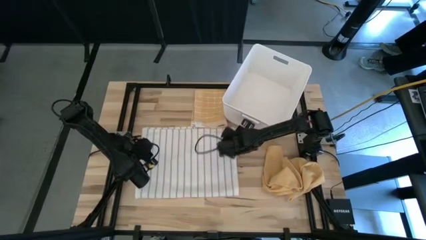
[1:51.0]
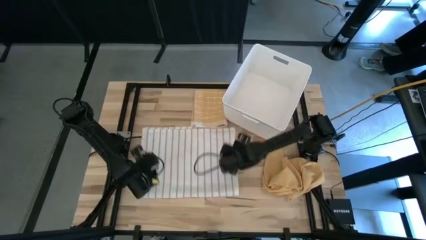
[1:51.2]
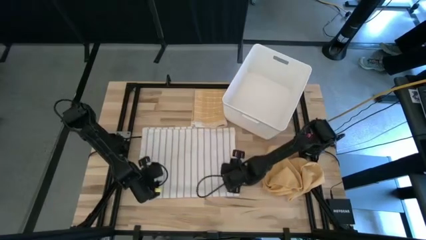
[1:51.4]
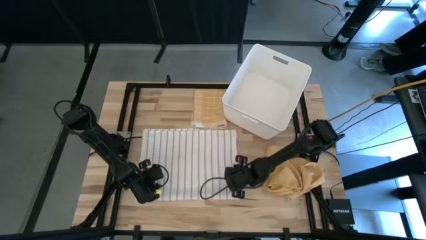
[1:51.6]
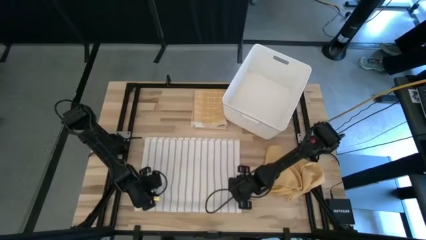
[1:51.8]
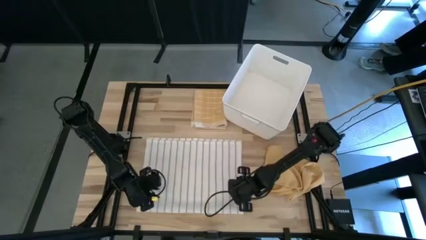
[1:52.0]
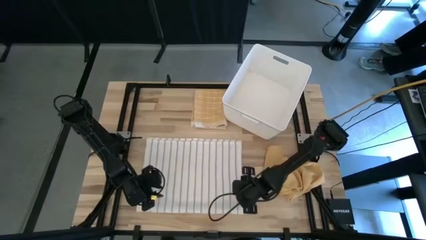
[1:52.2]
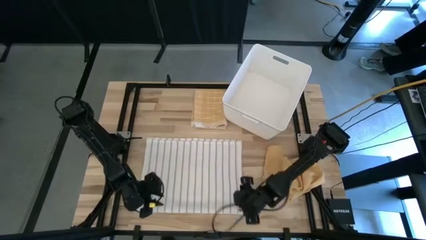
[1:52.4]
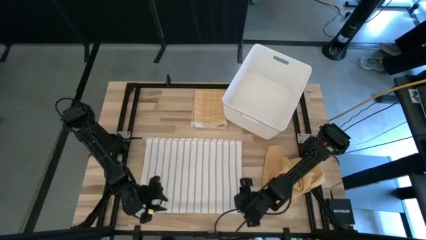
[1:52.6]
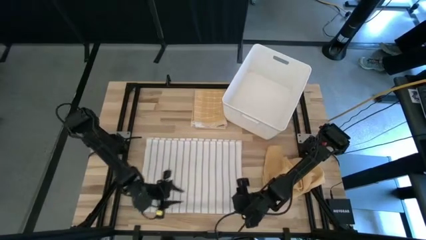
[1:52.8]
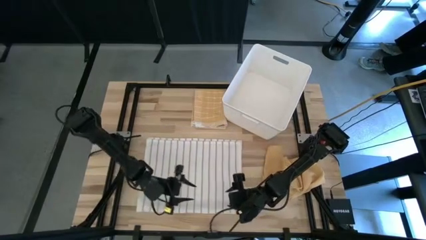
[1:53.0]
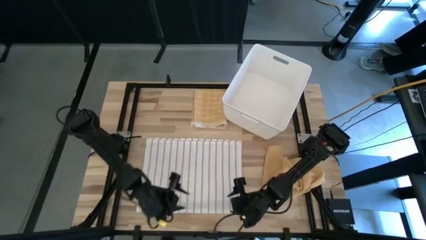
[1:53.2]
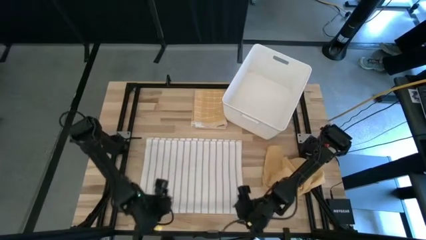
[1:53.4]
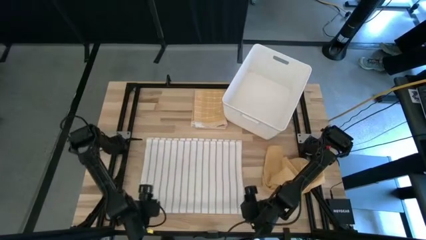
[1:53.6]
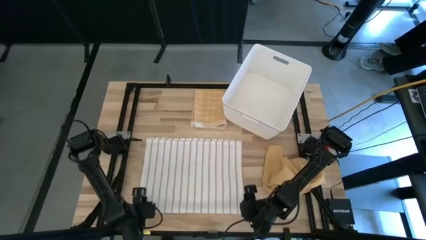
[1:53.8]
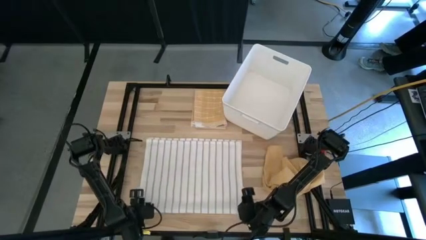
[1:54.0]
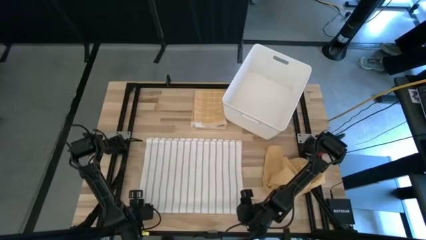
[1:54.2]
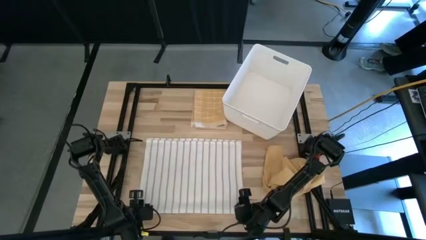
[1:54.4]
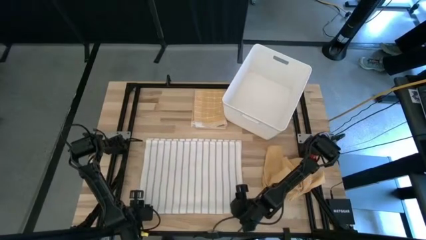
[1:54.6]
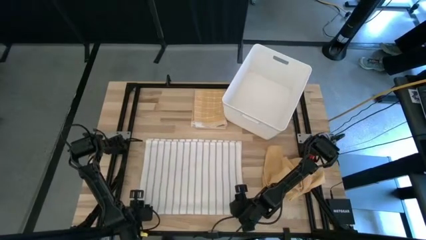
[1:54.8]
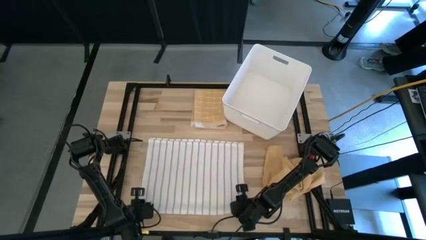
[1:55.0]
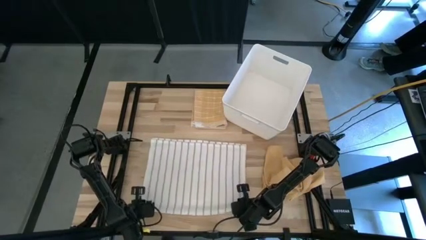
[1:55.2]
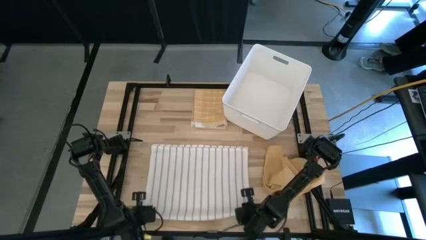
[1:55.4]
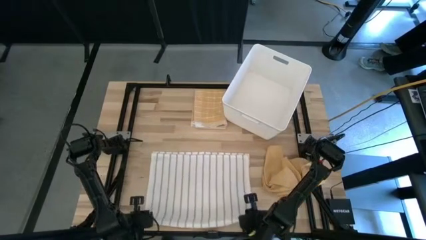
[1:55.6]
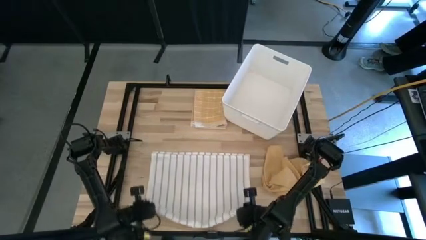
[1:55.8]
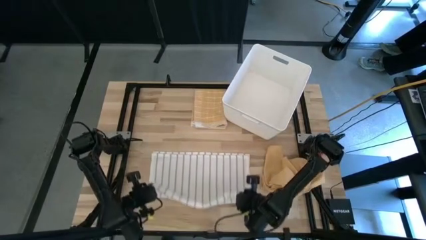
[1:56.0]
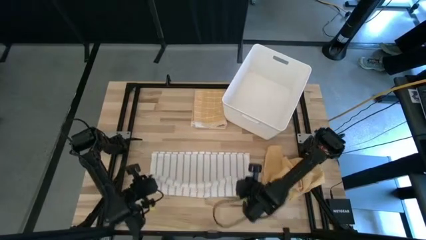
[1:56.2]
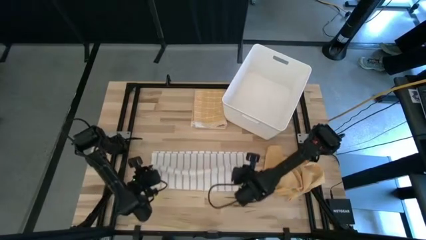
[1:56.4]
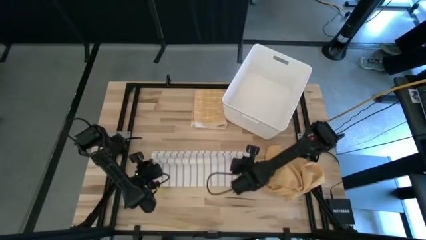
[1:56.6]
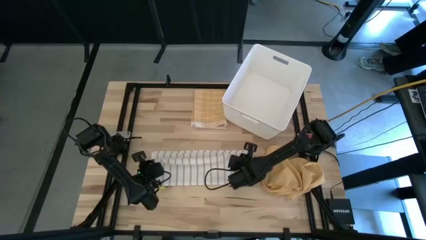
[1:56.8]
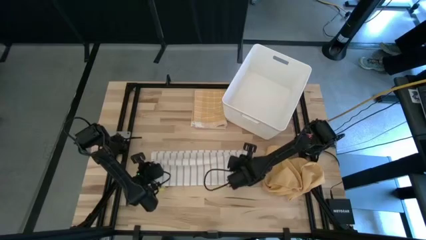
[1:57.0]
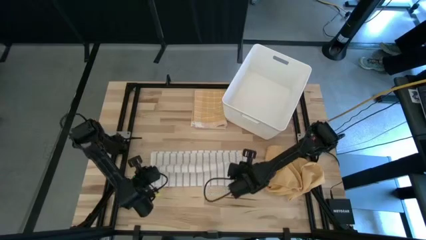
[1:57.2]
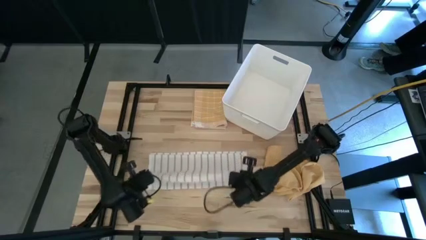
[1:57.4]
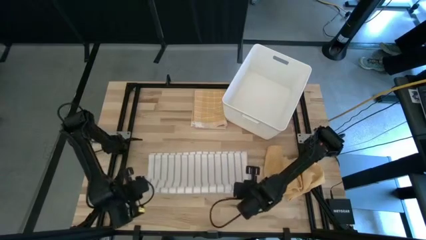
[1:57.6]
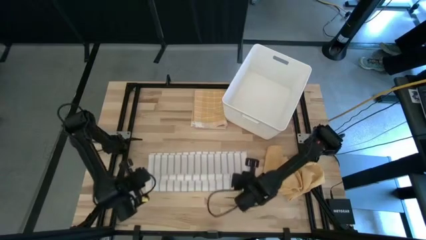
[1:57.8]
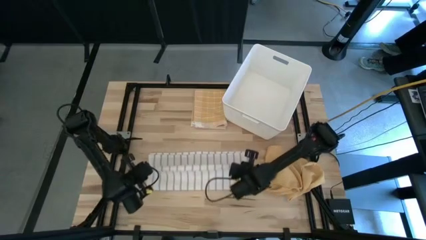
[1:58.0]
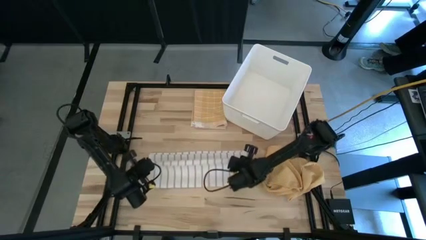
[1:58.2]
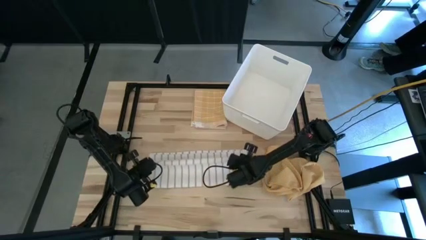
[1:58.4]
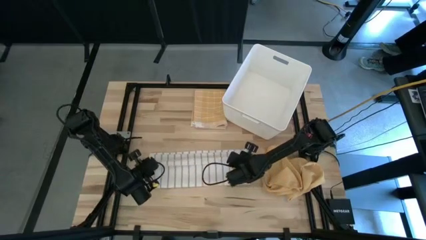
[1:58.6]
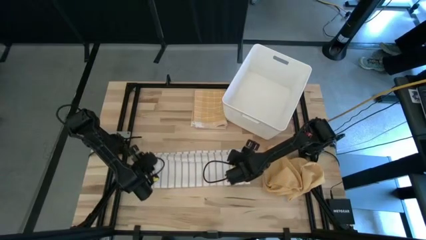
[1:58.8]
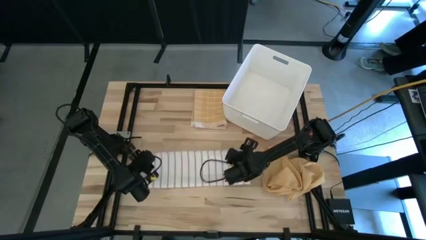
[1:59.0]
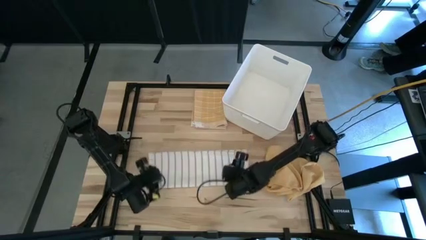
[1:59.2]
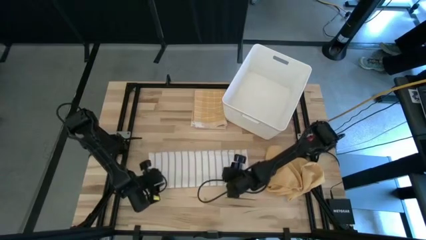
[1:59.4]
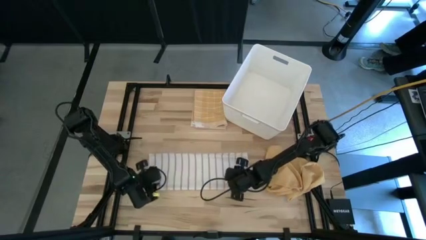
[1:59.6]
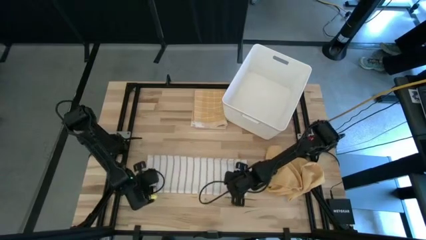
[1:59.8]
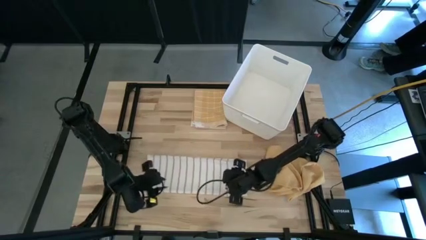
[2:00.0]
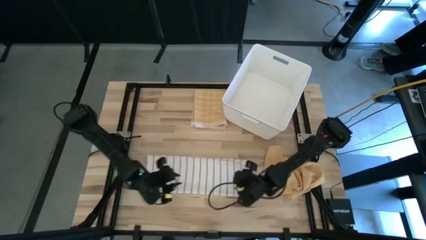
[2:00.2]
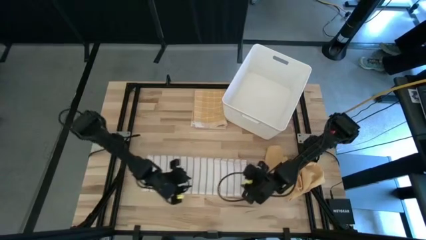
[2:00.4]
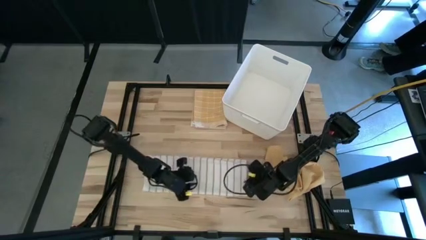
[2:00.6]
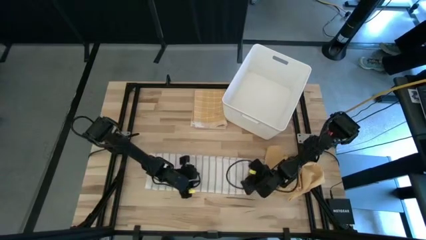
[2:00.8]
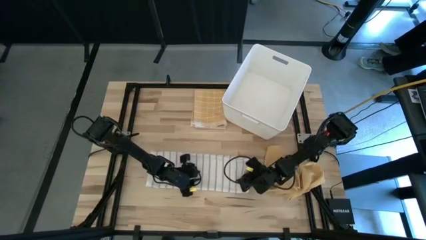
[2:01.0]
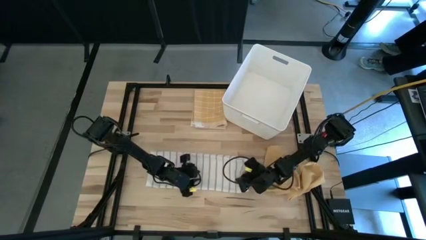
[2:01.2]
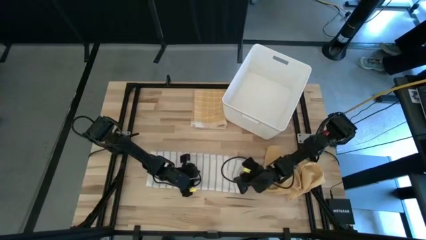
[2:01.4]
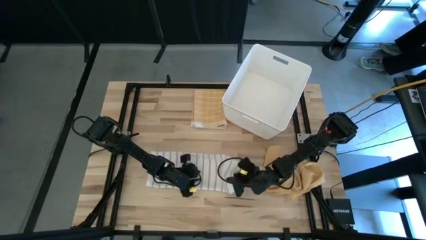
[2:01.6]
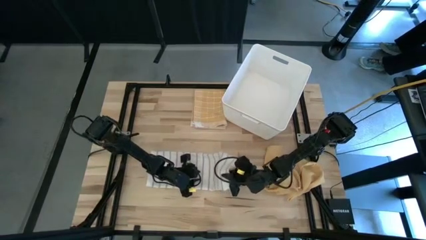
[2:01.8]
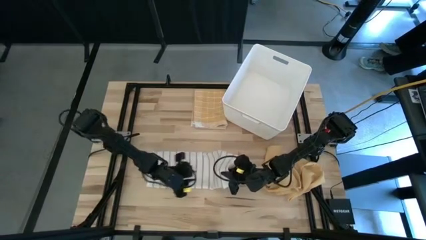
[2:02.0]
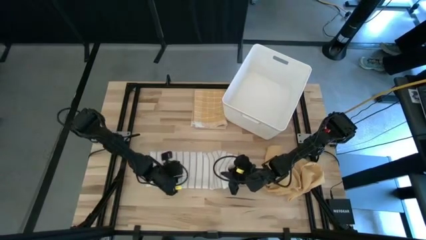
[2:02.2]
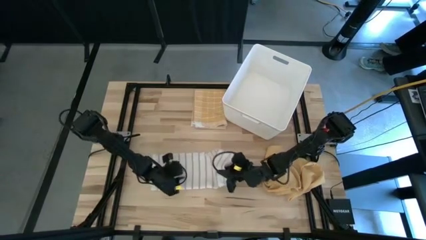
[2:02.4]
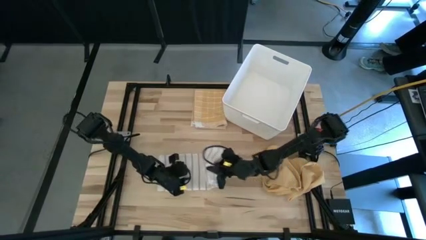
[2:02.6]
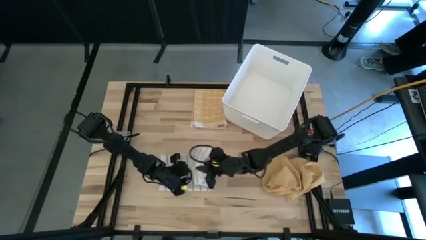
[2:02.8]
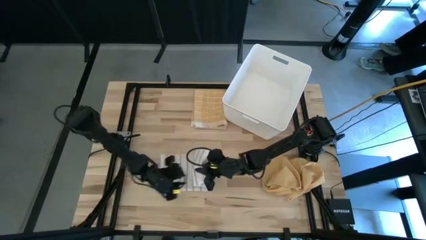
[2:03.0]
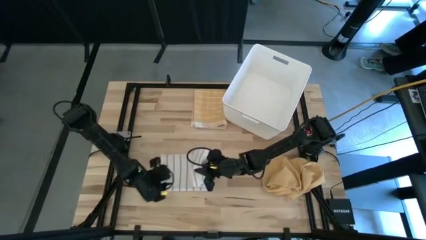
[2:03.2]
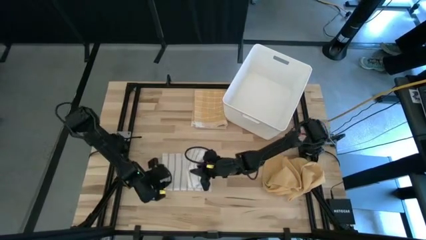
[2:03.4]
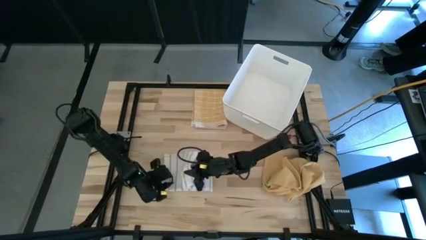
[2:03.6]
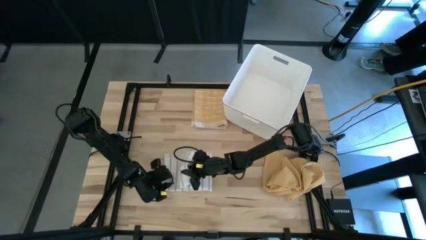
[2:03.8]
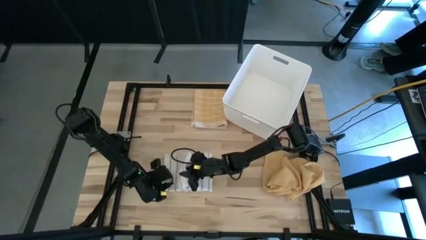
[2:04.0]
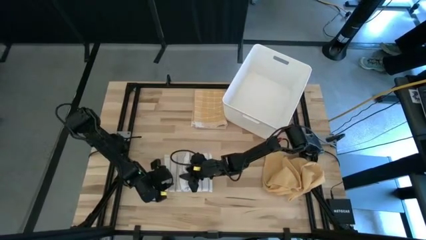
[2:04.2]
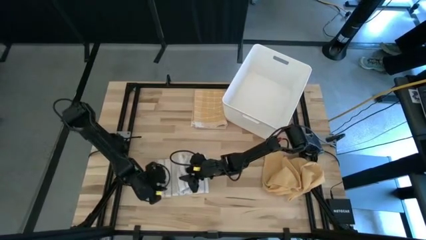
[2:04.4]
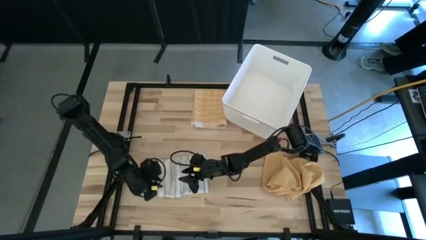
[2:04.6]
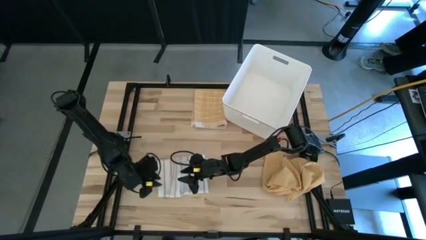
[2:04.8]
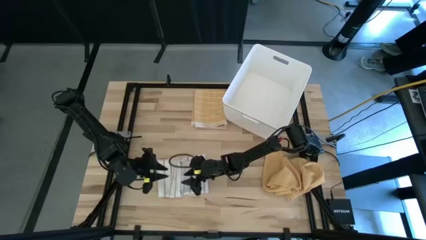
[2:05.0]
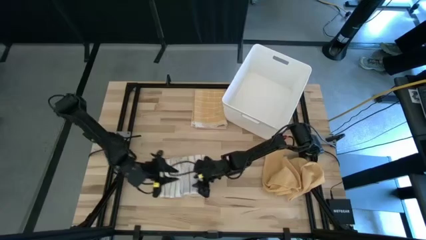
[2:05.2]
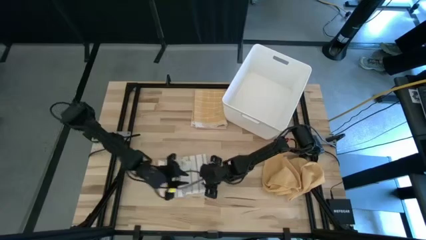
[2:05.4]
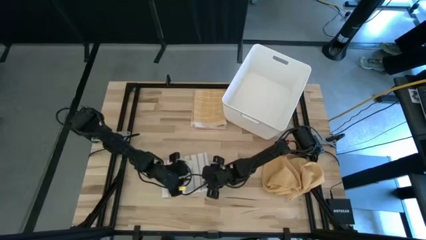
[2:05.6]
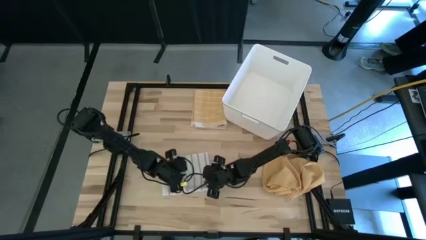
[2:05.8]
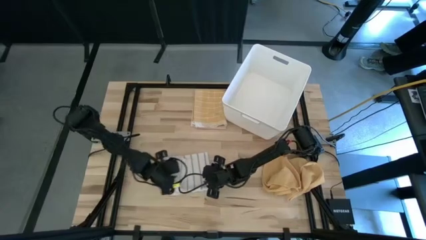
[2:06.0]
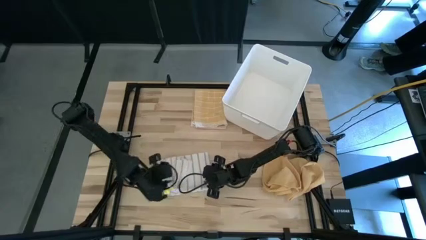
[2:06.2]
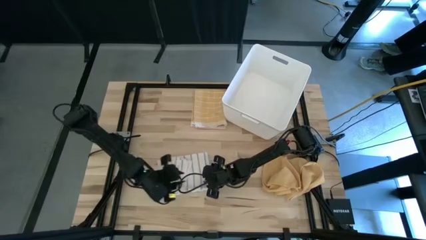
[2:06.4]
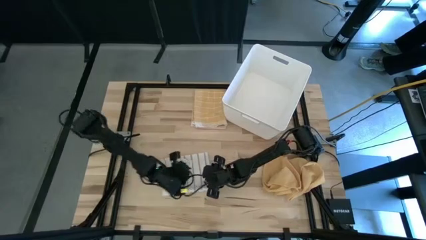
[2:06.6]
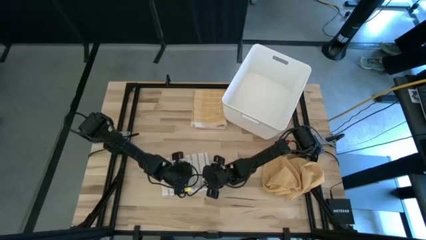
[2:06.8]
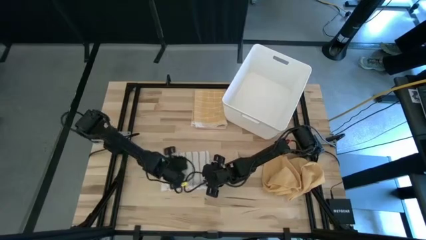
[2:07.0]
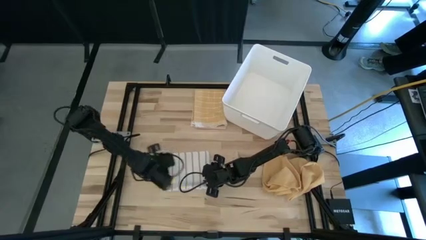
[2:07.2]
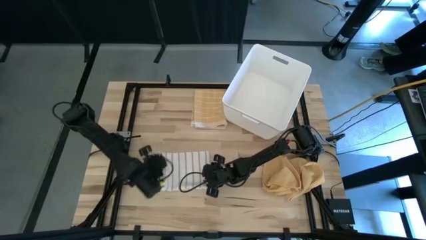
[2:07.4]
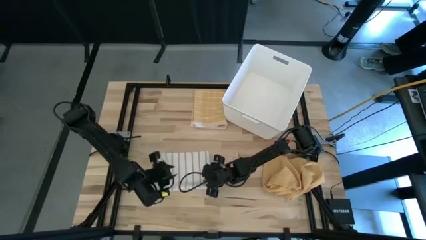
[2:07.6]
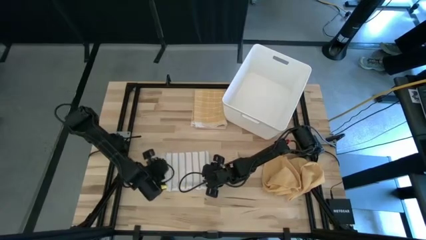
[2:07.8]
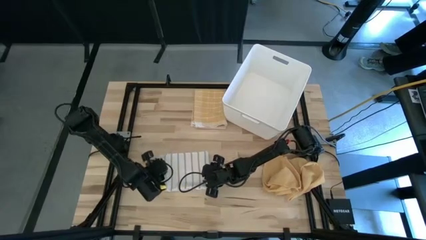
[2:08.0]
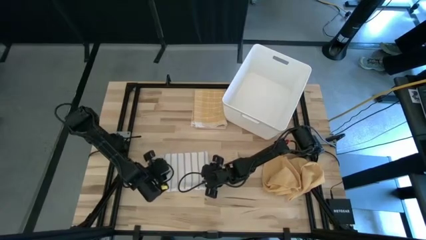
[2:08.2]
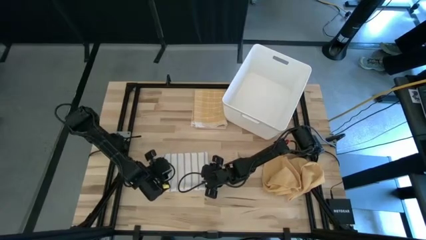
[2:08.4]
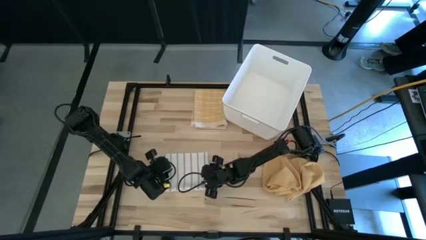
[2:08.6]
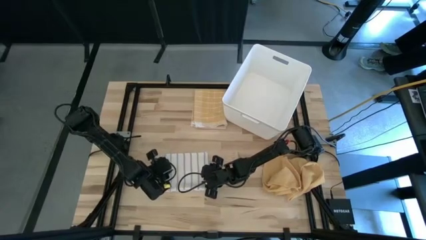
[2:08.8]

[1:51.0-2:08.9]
Task: Fold towel
Fold the white towel
